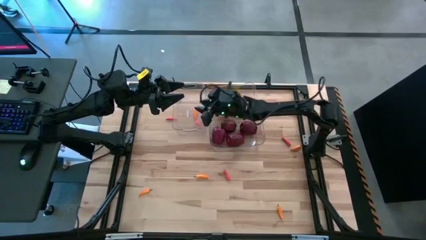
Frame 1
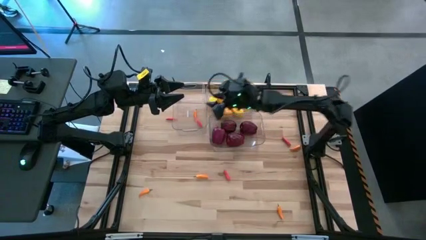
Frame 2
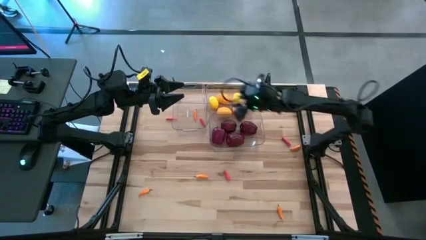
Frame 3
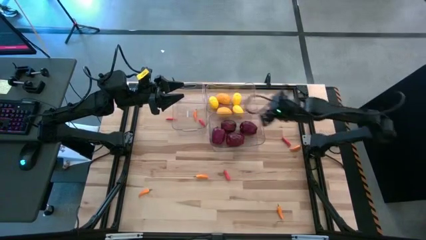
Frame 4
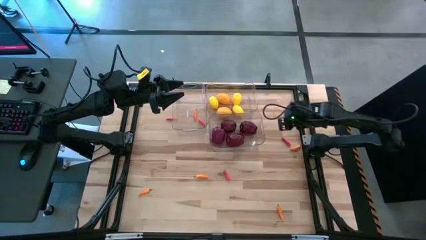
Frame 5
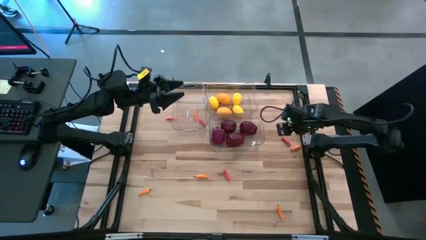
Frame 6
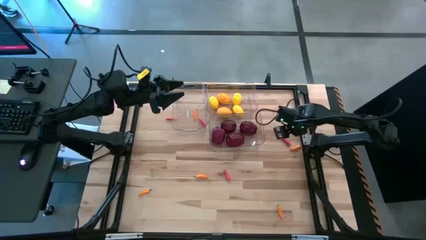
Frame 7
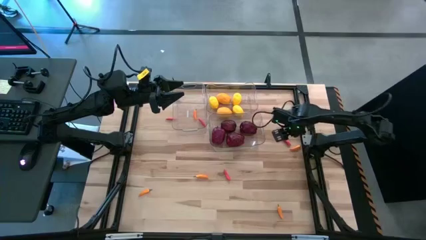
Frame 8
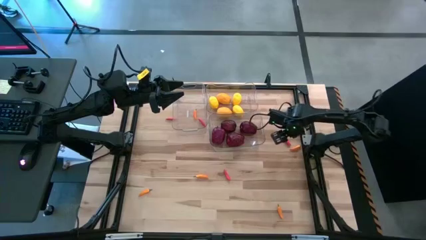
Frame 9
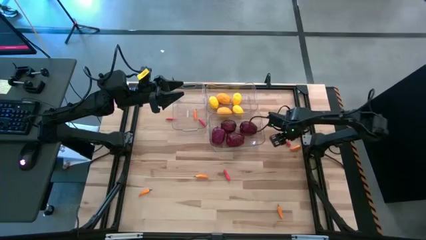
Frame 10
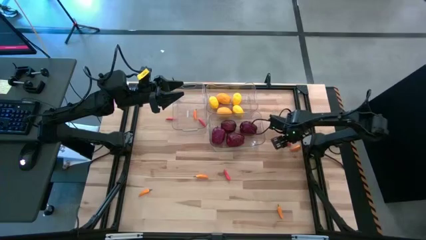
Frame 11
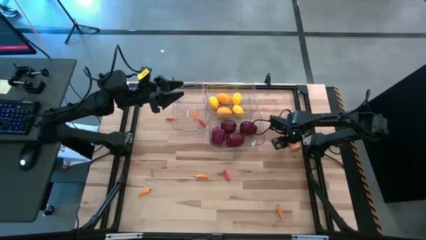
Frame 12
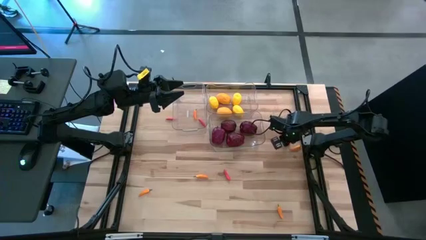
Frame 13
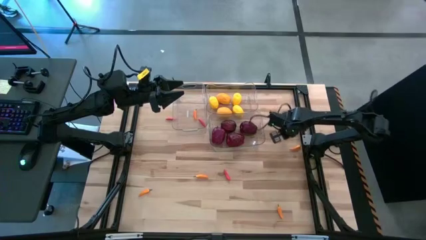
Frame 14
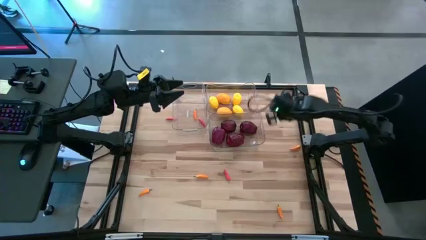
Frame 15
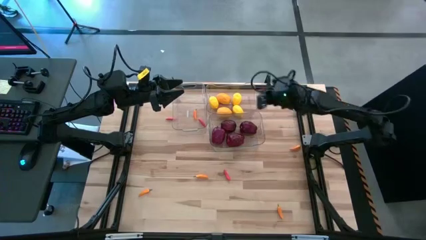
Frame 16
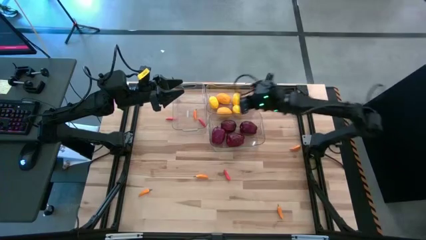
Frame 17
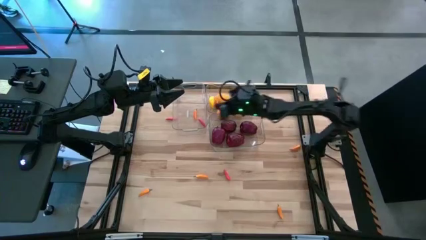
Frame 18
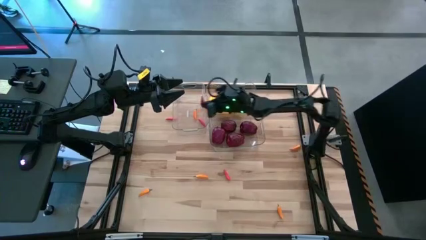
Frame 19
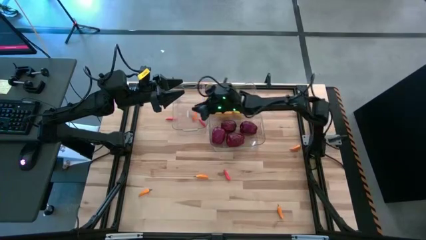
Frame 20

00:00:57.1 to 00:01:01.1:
Task: Sort produce into baskets
Put the red chili pepper into the top left transparent bin

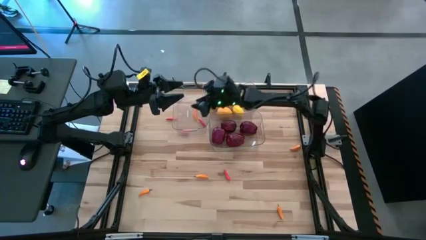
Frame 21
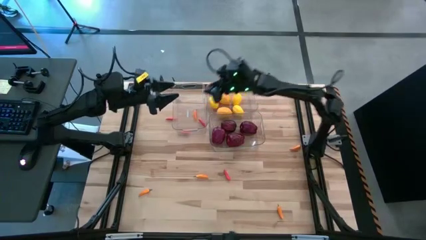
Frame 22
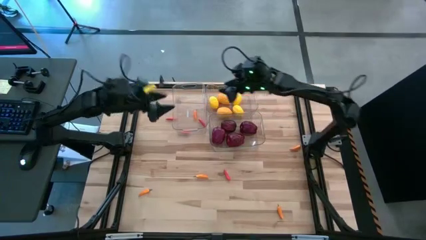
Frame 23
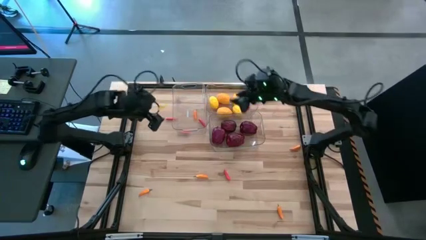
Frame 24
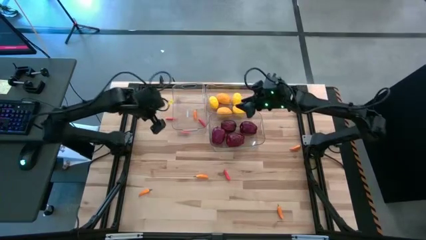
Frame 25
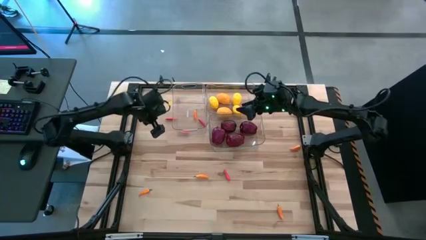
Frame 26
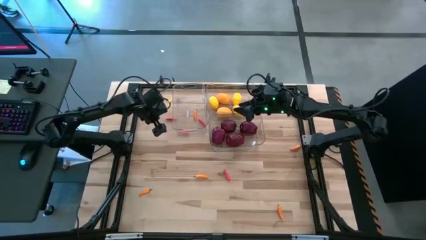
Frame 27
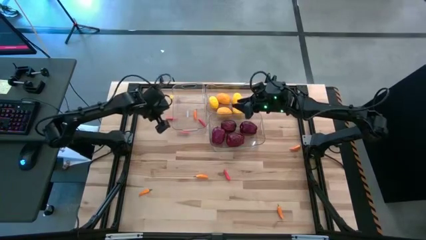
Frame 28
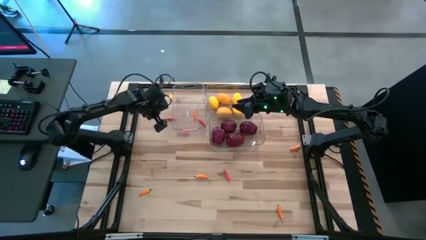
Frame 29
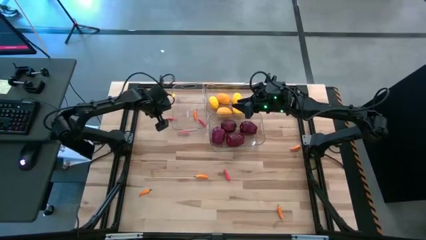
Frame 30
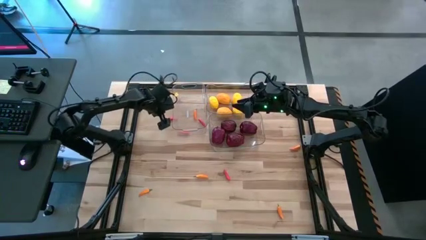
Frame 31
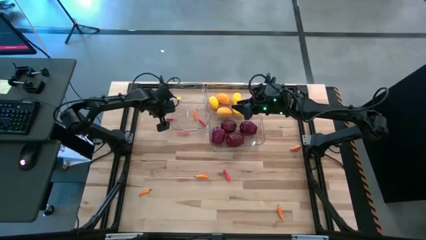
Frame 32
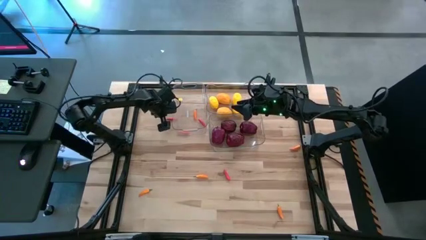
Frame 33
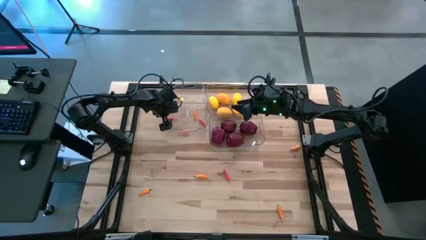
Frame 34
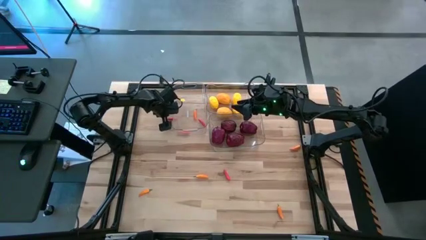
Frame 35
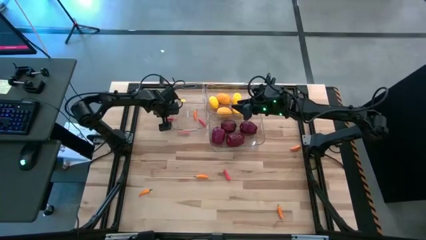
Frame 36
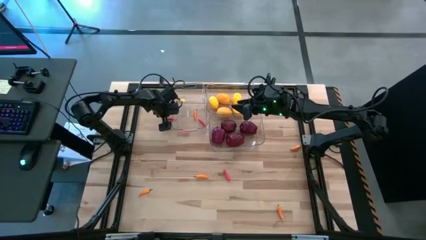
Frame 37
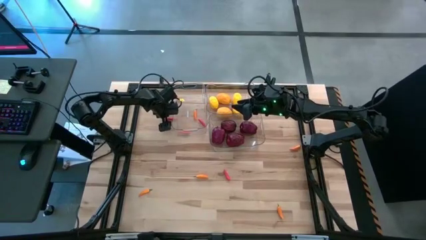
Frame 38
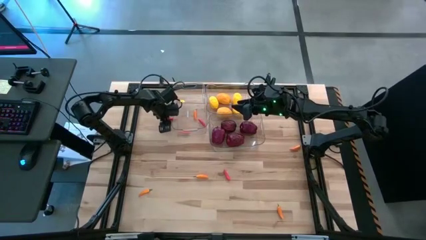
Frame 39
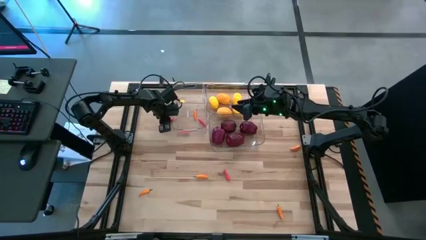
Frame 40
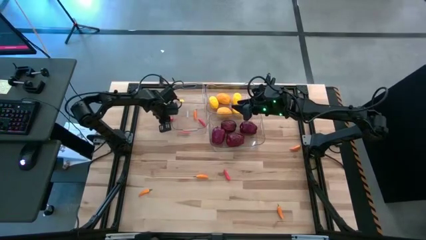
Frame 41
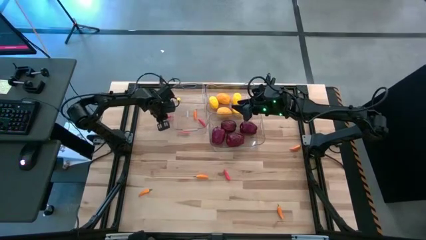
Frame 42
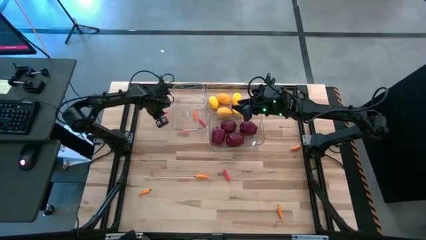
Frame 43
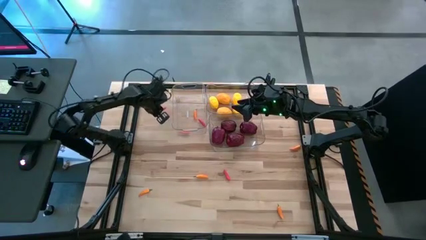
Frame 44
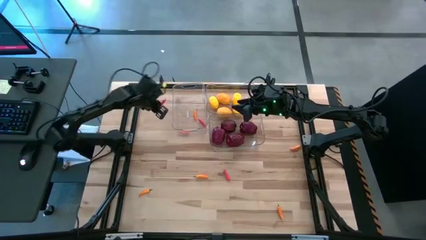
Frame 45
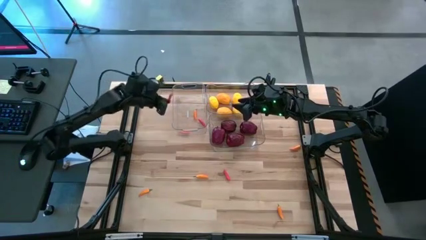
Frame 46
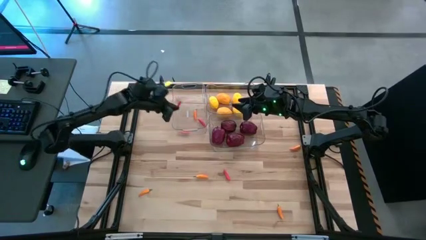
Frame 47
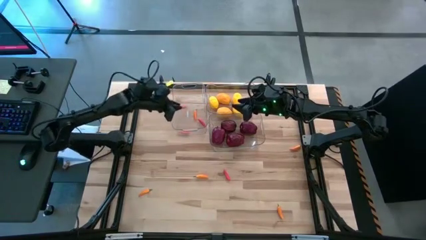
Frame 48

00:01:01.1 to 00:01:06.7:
Put the red chili pepper into the top left transparent bin

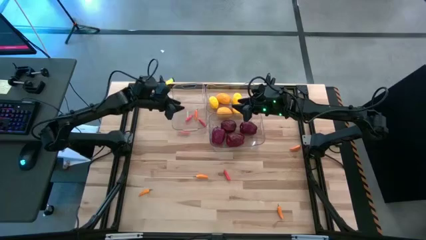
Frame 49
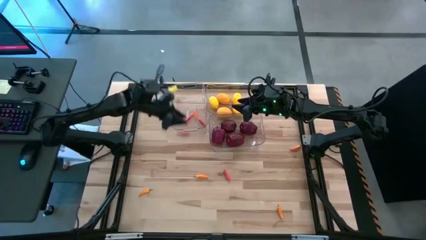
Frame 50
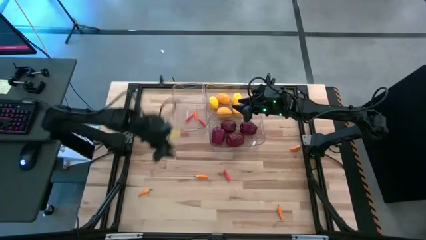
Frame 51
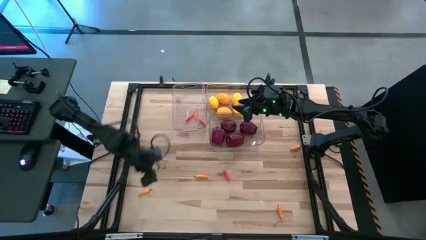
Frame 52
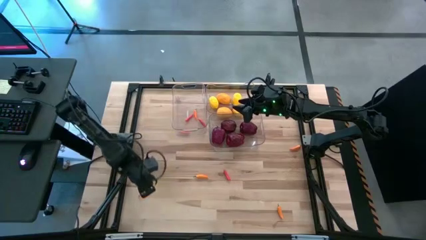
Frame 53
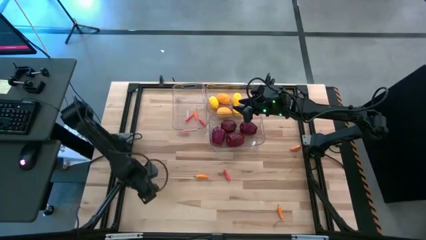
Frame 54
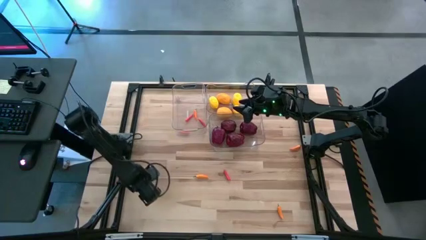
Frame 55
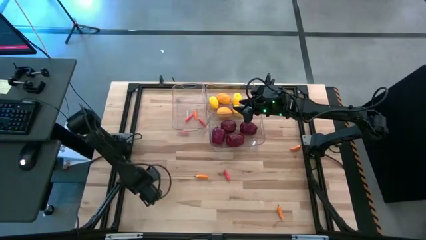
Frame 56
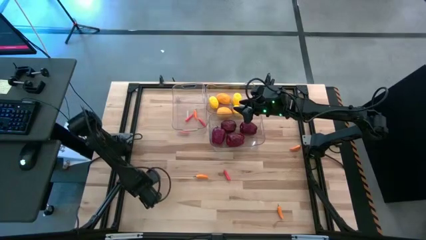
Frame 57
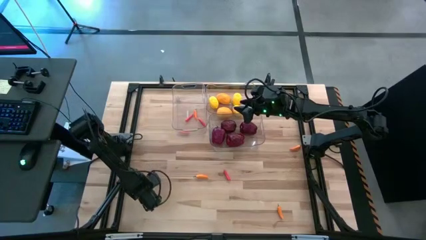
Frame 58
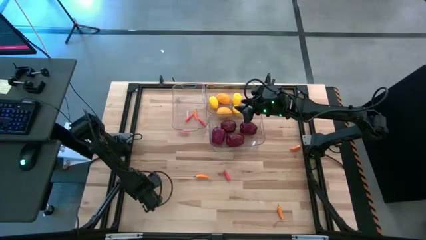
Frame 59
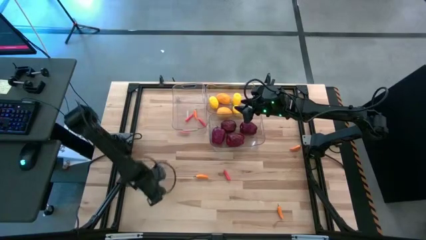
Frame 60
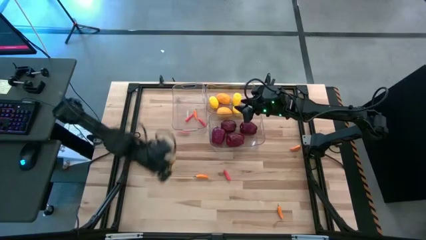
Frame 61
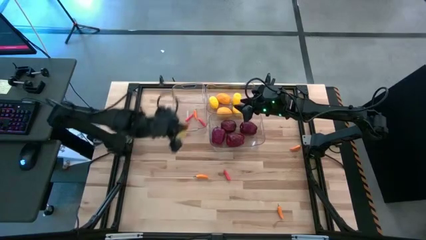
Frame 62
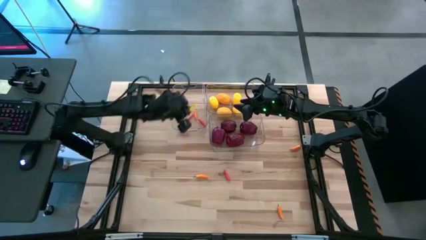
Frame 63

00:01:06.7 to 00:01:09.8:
Put the orange chili pepper into the top left transparent bin

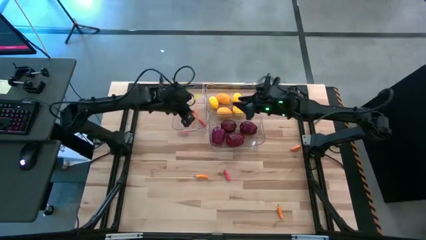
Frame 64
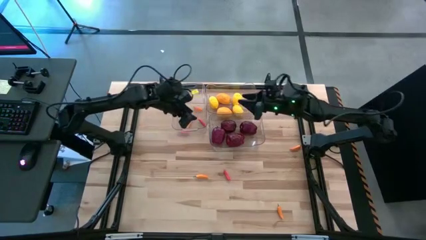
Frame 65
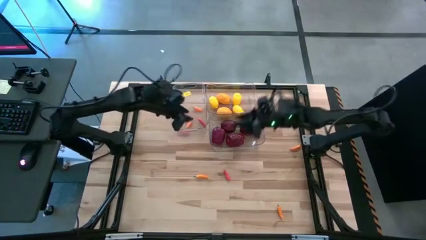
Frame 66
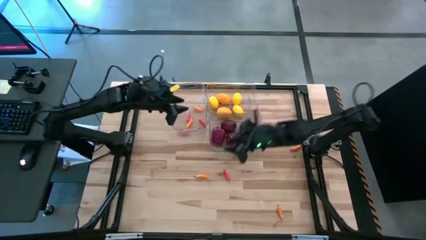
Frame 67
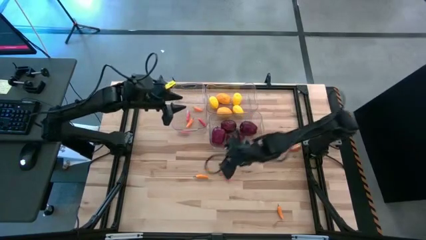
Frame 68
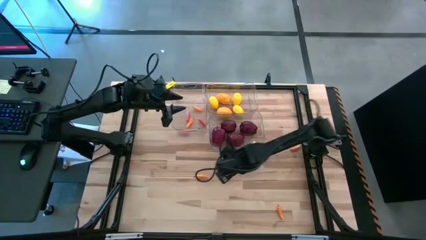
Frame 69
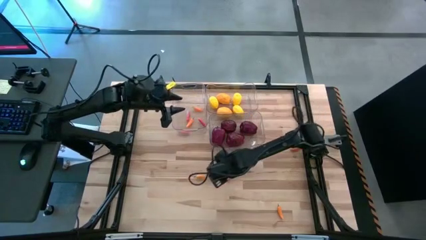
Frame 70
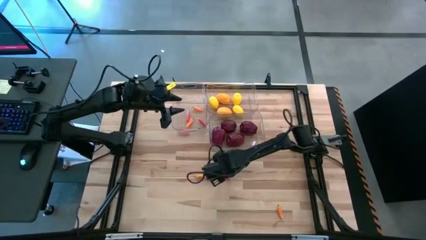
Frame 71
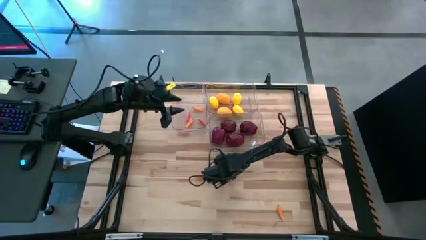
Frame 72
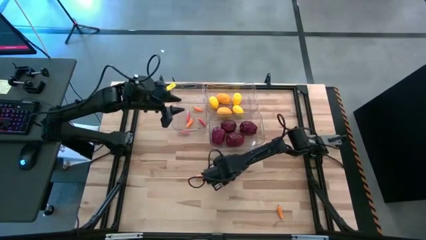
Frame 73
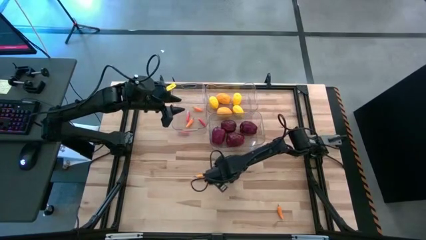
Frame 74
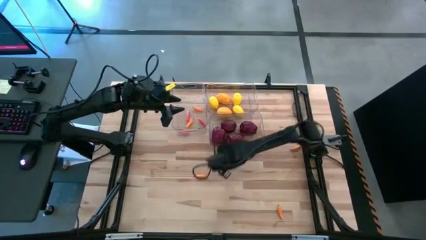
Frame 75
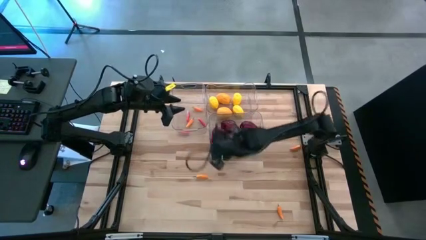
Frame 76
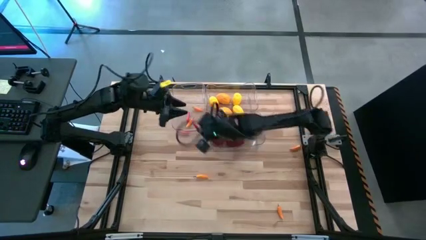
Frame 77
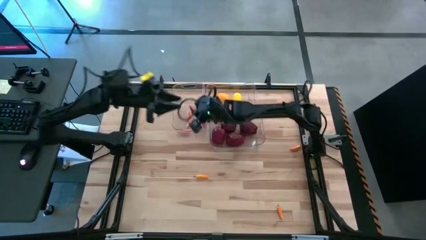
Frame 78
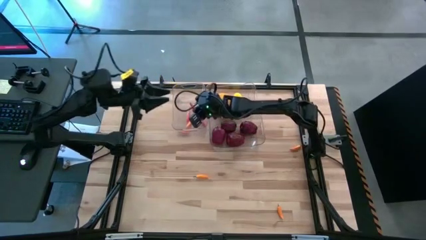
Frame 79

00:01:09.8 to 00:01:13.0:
Put the red chili pepper into the top left transparent bin

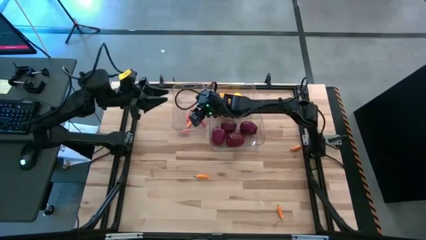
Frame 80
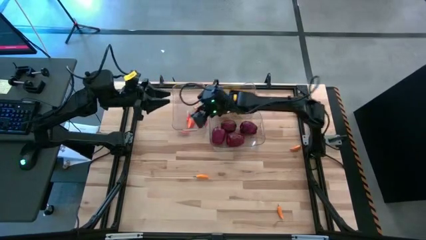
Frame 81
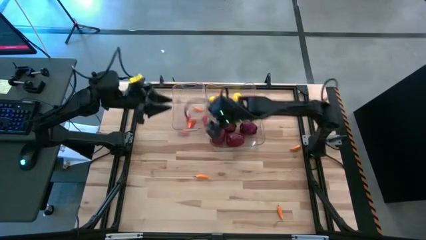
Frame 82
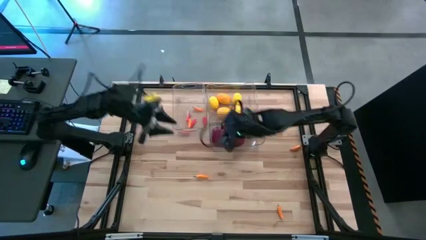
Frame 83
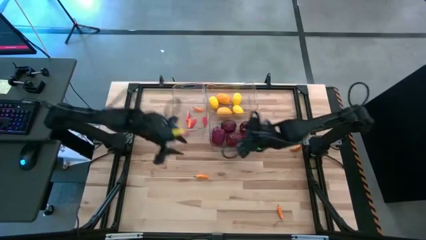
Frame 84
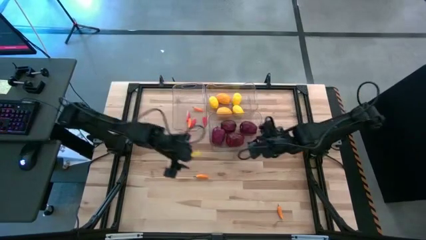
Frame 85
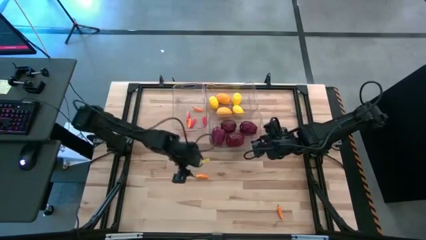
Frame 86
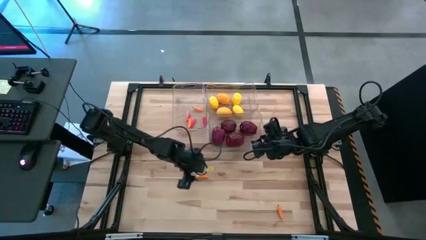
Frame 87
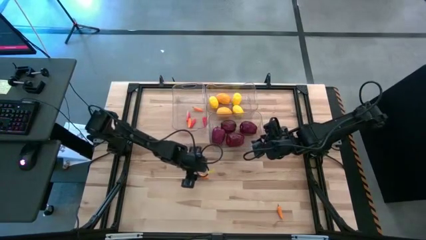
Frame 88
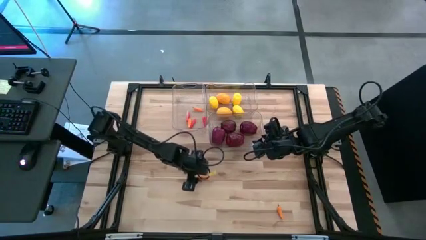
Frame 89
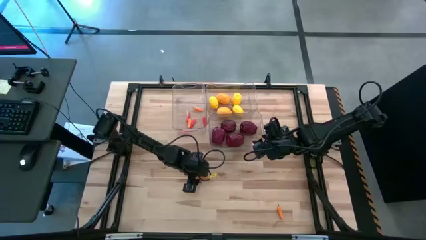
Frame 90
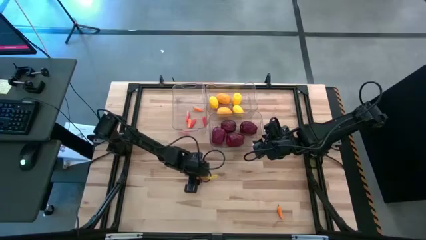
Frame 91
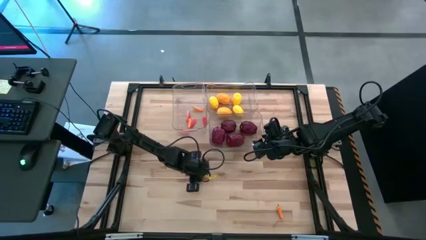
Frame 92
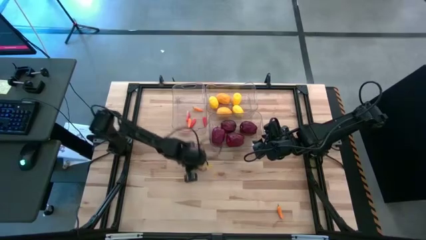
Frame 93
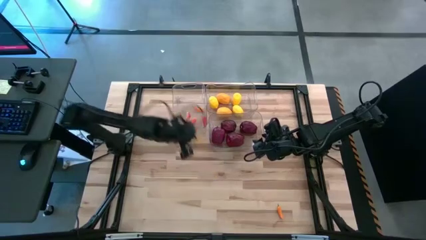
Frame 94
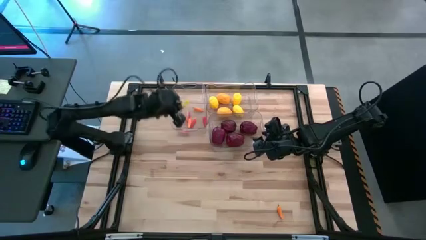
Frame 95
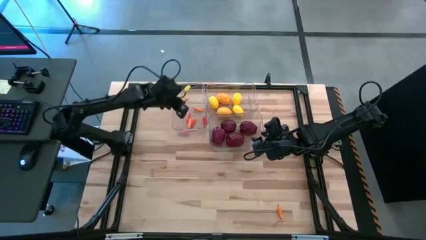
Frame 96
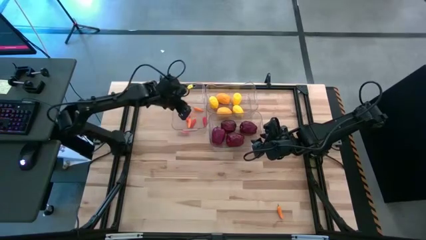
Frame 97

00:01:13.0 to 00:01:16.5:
Put the orange chili pepper into the top left transparent bin
